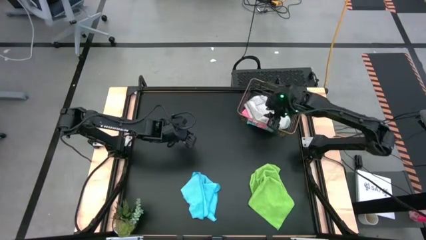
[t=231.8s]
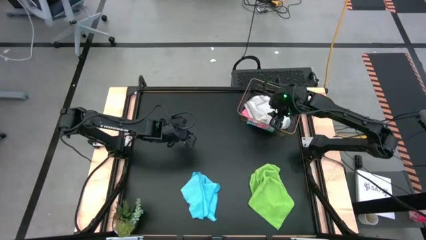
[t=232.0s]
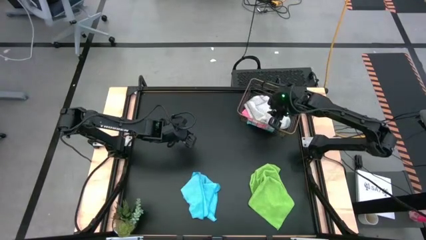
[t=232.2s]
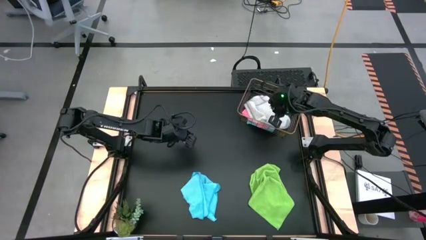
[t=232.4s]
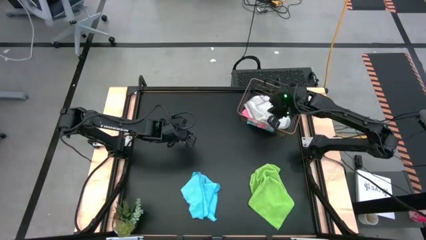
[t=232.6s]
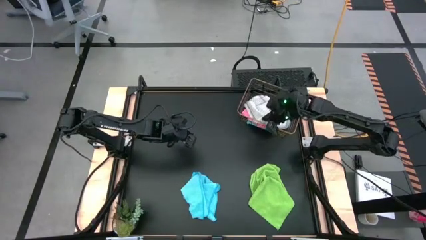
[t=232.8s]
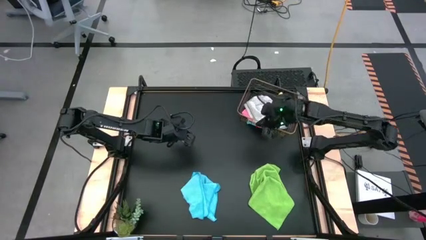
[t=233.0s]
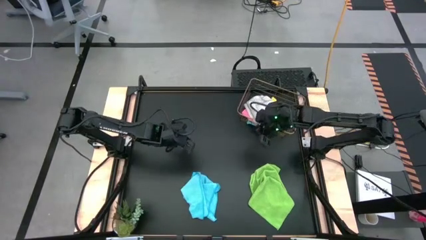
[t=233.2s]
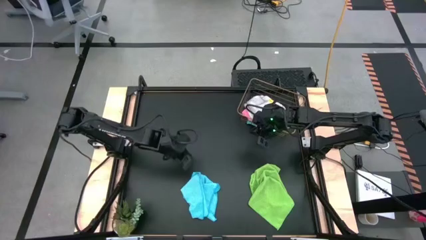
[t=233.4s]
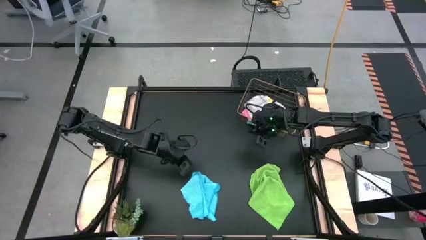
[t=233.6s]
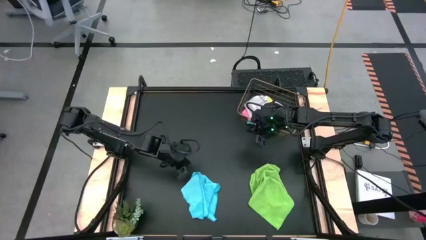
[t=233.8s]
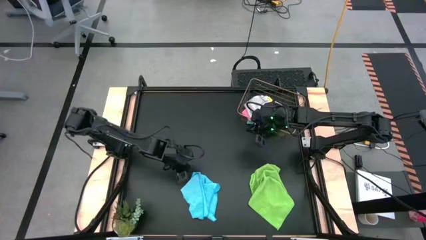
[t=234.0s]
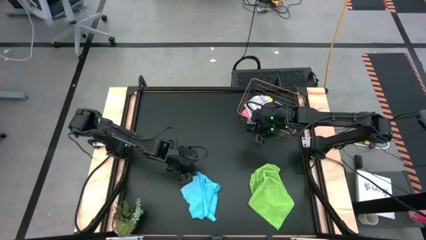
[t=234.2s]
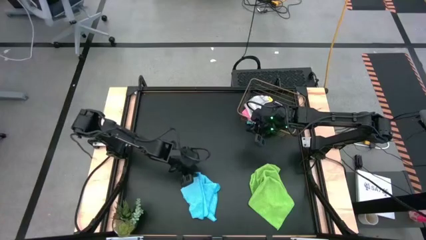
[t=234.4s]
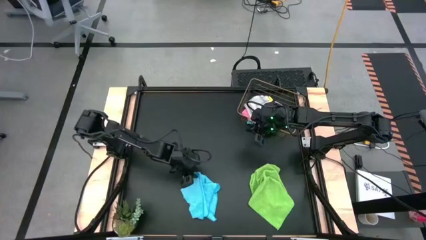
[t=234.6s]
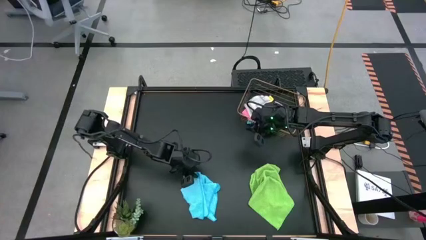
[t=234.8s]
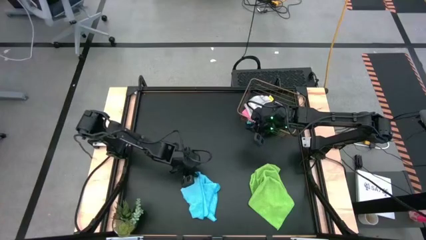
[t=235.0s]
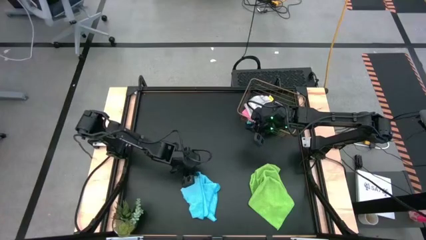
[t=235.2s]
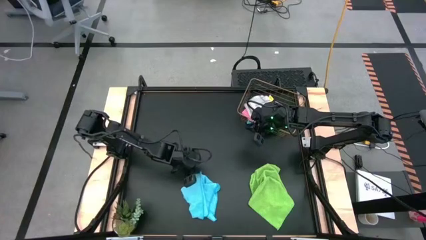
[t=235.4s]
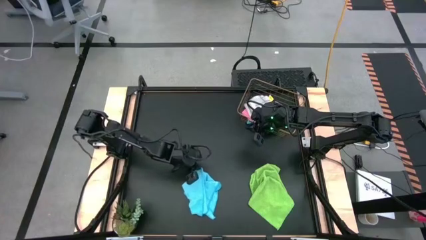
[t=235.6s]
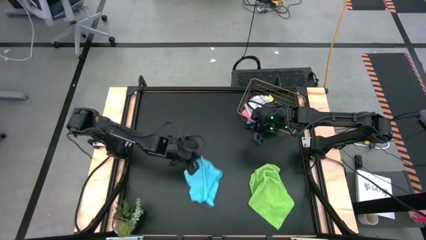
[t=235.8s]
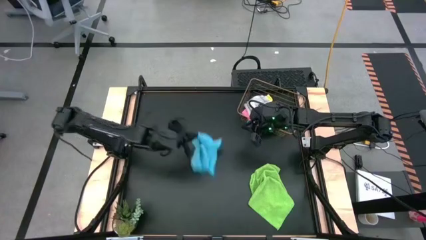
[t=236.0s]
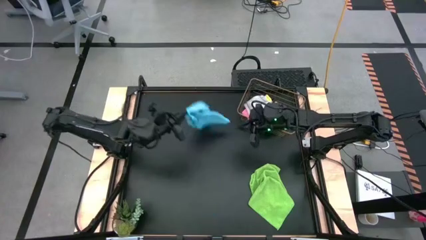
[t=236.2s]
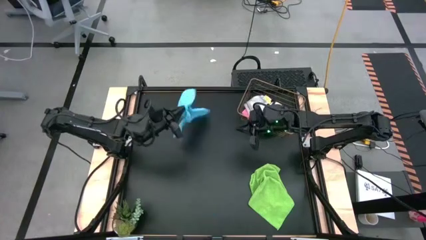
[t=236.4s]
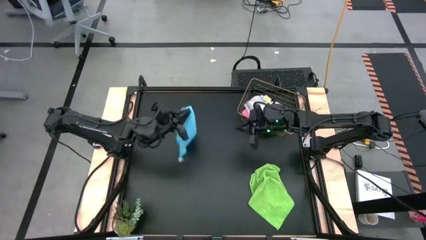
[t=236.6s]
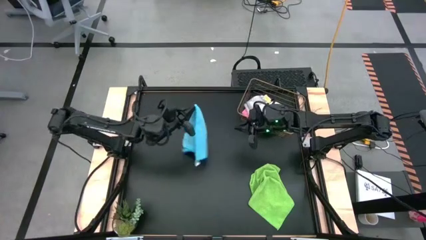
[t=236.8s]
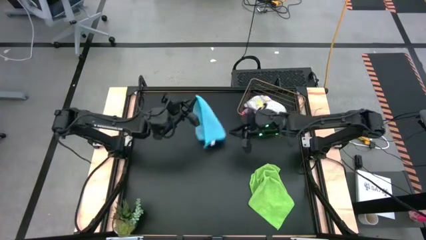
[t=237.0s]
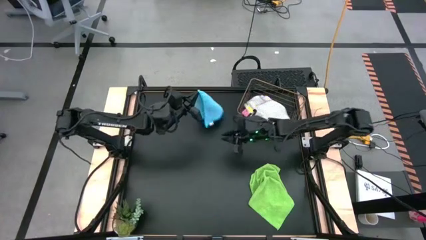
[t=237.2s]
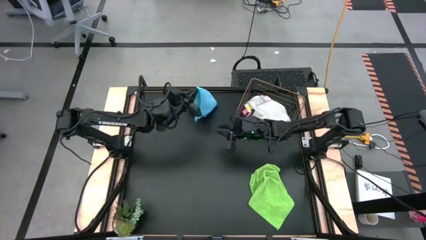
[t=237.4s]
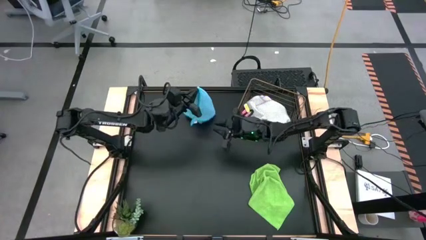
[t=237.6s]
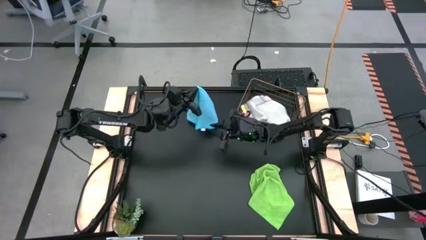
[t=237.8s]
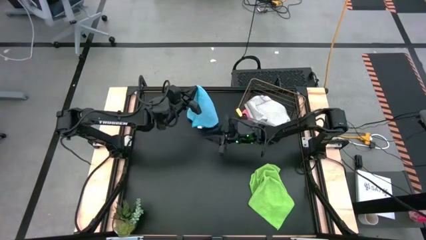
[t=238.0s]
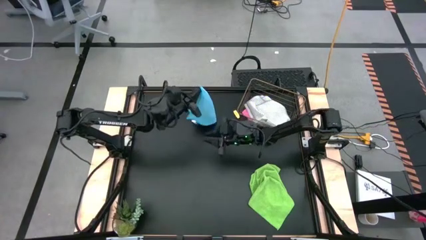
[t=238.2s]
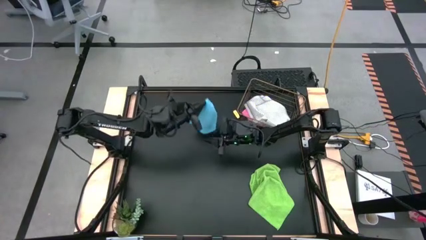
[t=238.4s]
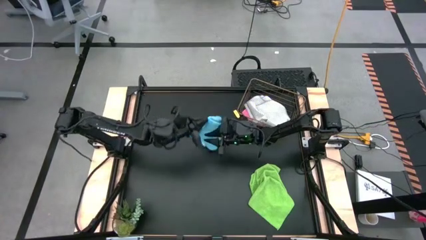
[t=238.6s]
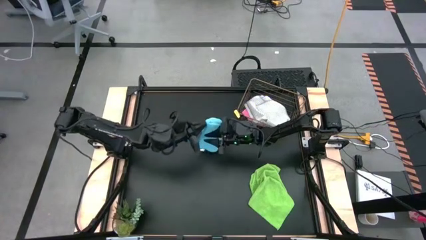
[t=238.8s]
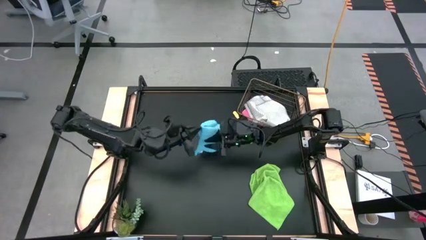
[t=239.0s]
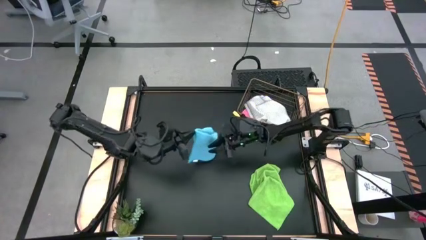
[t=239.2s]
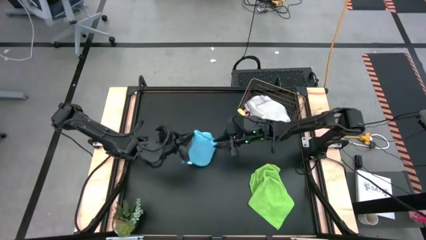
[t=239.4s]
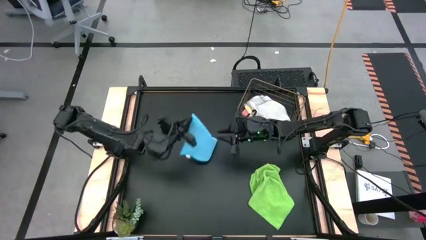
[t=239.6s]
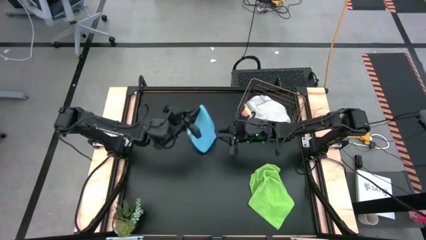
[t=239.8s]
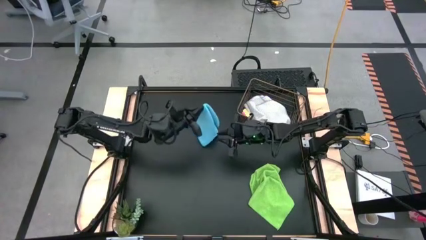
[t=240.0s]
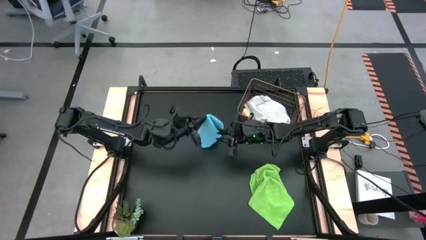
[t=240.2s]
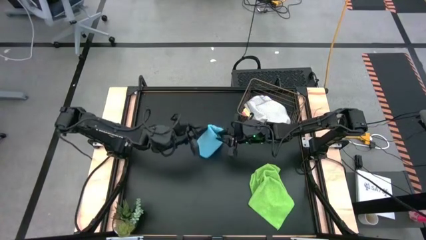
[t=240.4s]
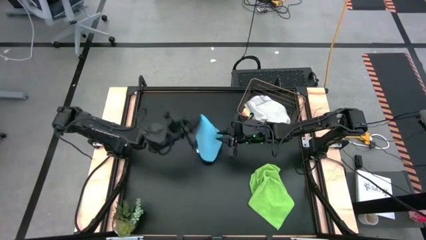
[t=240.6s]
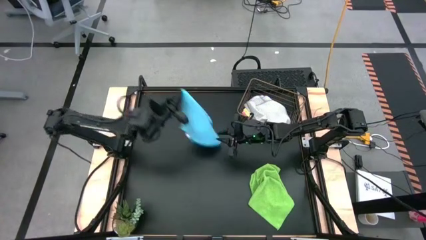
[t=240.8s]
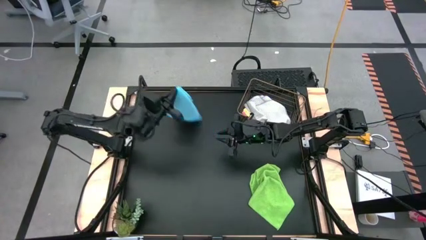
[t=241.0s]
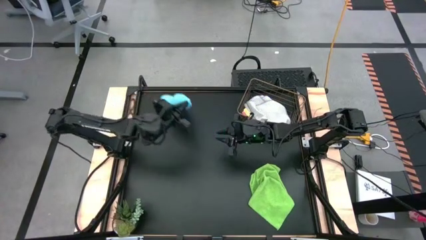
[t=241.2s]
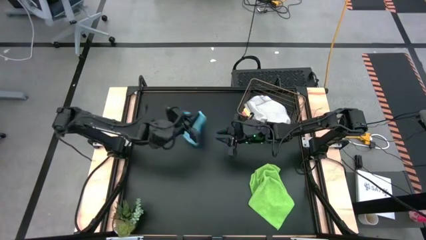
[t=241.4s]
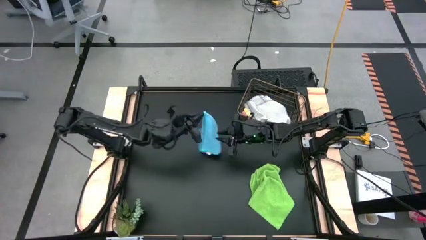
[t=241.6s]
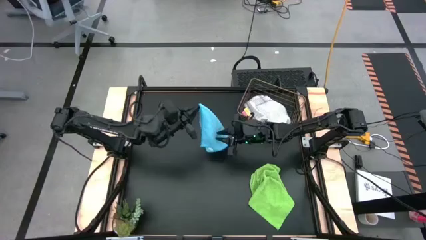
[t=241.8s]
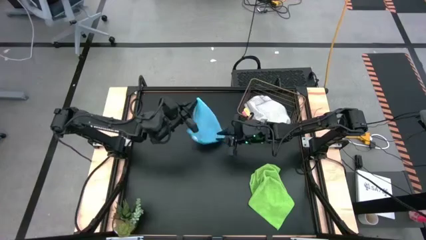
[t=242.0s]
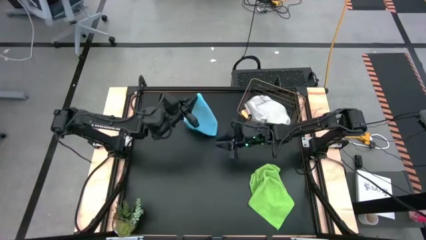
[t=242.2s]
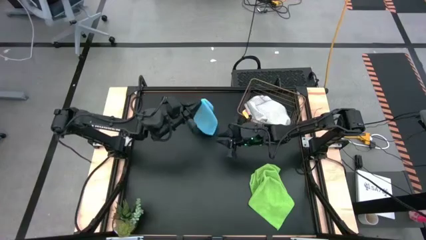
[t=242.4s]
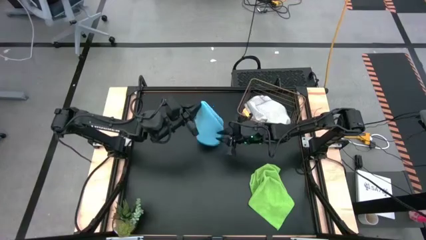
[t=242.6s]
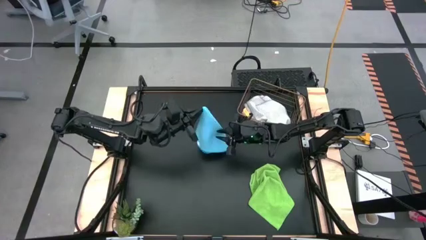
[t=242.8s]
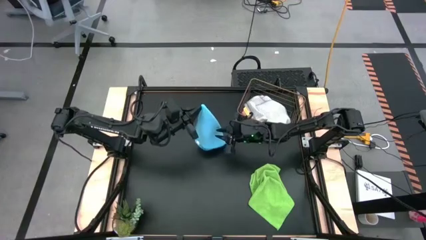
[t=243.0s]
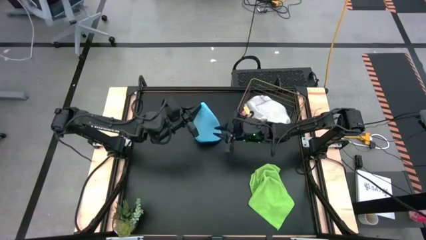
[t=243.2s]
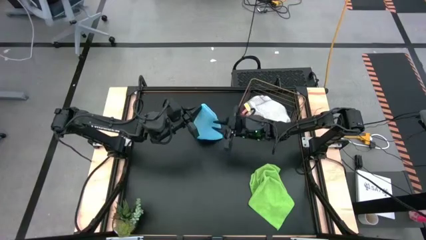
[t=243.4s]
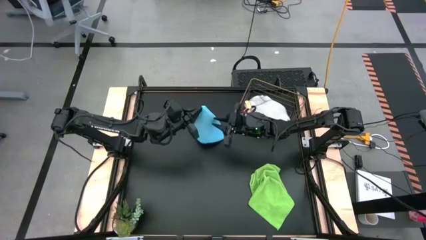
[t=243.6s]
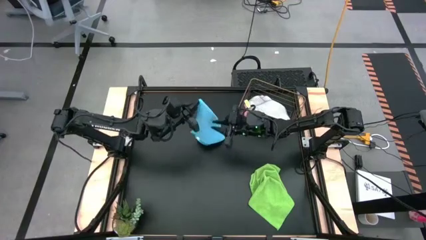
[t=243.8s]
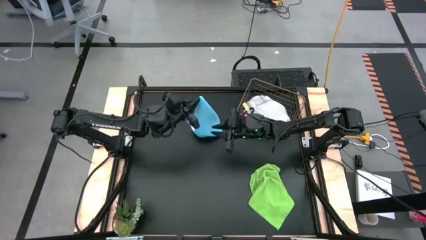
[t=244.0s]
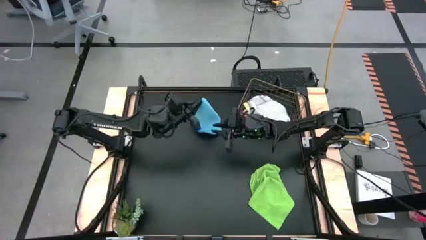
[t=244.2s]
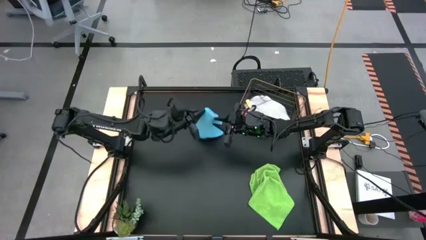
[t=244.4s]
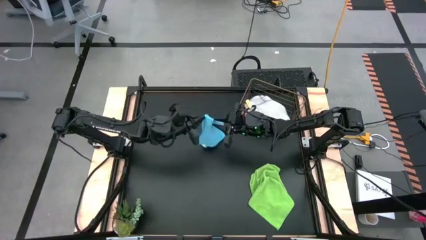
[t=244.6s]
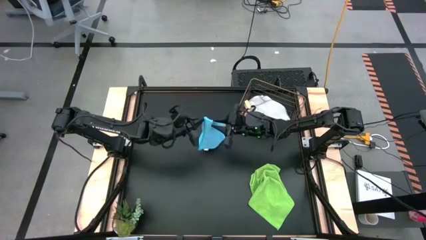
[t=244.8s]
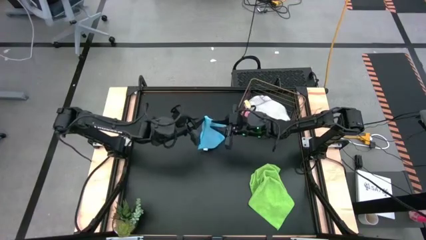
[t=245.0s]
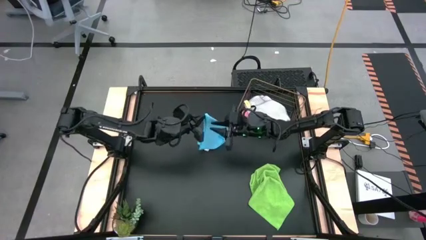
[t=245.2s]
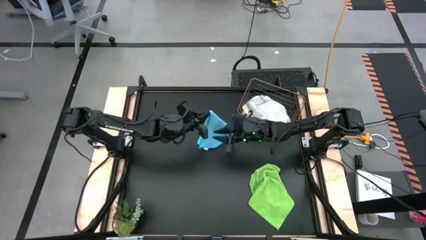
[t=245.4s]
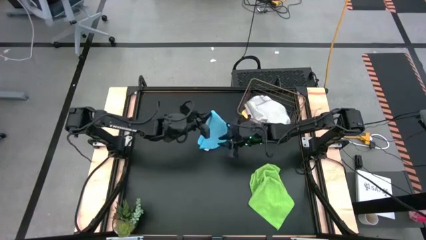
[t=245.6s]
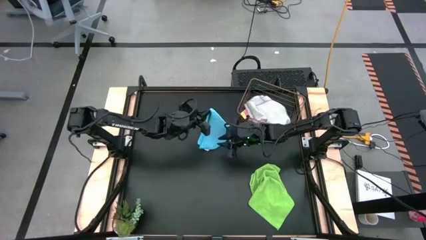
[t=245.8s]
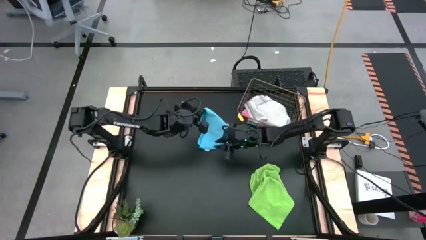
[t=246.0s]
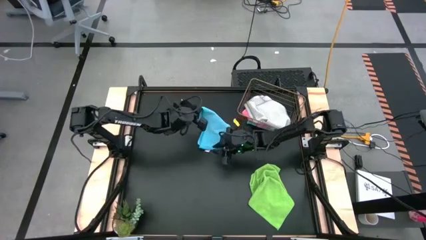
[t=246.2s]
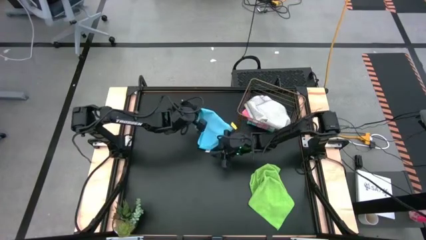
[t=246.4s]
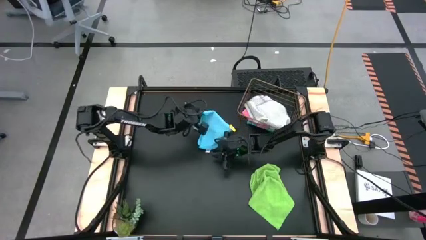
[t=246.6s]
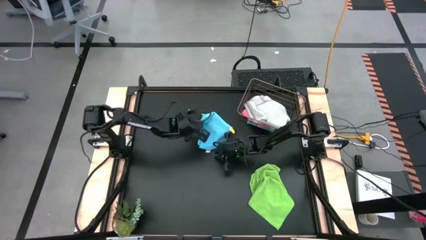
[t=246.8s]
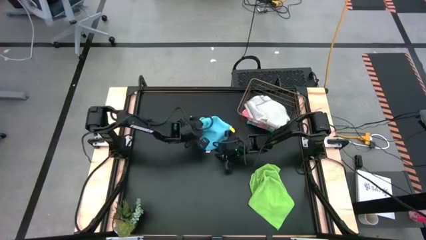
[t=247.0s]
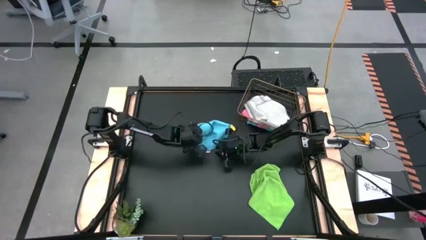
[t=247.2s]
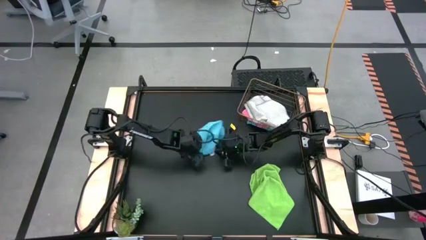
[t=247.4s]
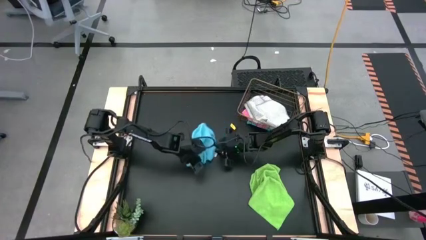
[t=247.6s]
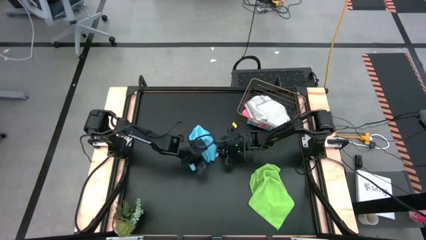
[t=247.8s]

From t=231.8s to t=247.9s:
Task: Fold microfiber towels
Fold the blue towel

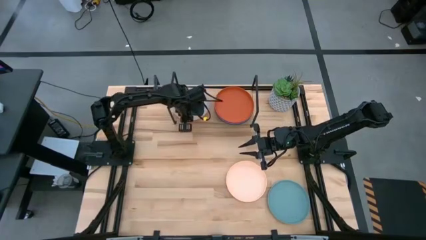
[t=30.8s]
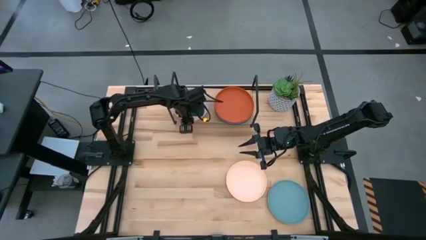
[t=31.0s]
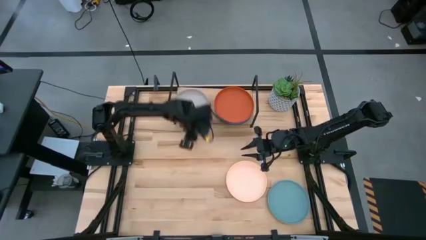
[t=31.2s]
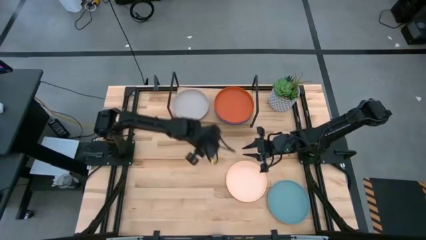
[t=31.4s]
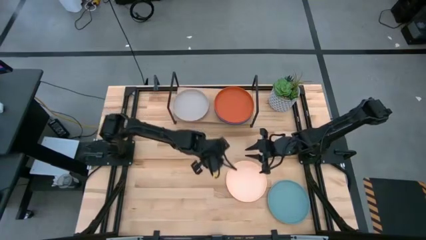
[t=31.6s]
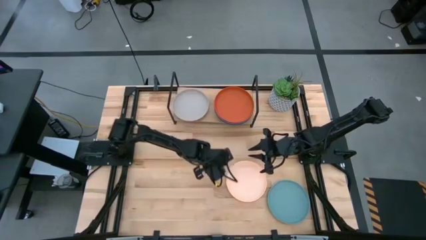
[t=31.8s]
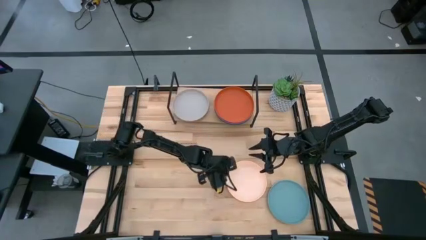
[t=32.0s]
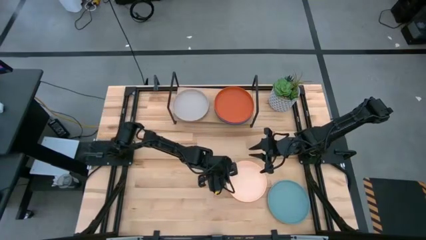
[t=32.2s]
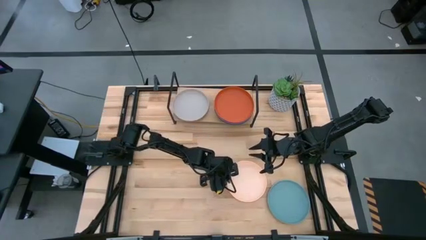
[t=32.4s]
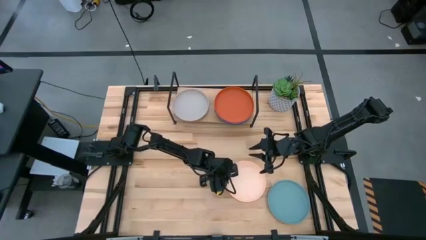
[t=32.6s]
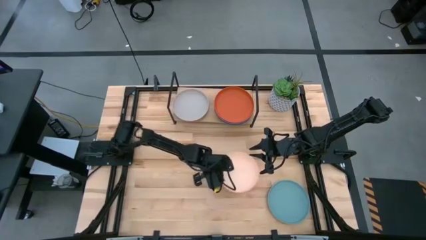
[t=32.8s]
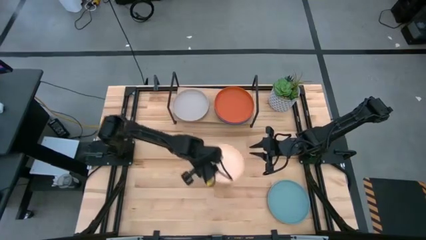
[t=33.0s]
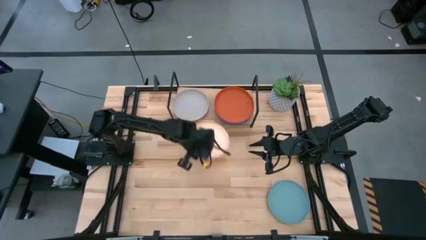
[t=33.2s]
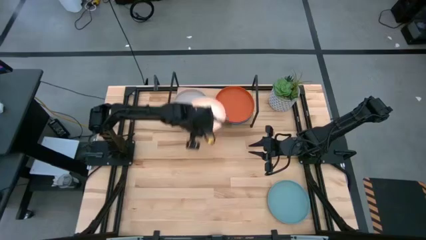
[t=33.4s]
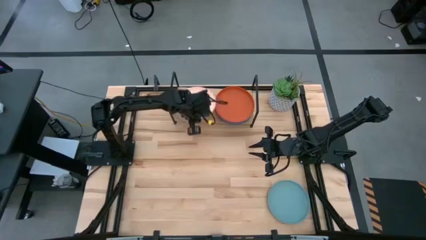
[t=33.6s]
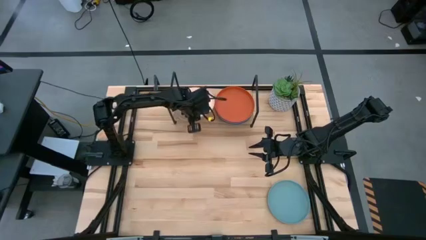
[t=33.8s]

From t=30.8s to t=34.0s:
Task: Place and stack plates onto a shelf
Stack the light orange plate on top of the gray plate on the shelf
